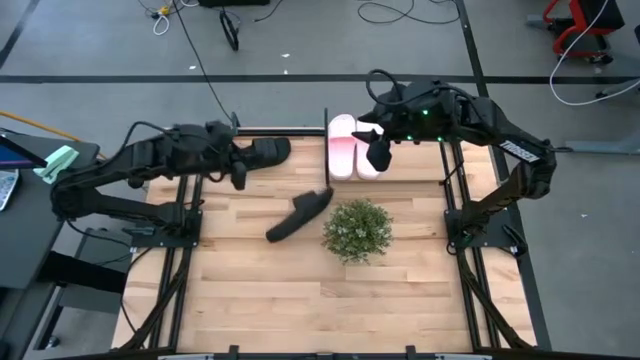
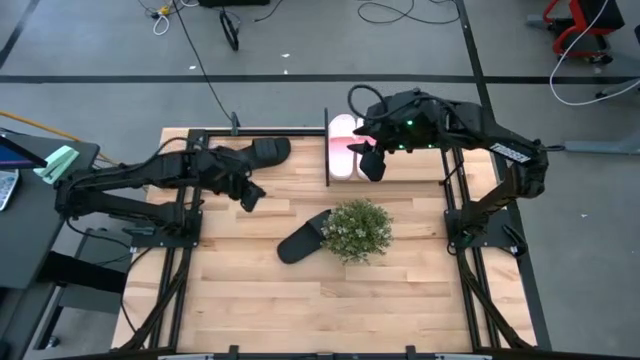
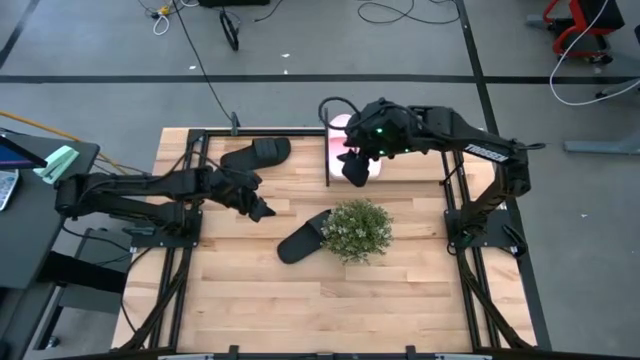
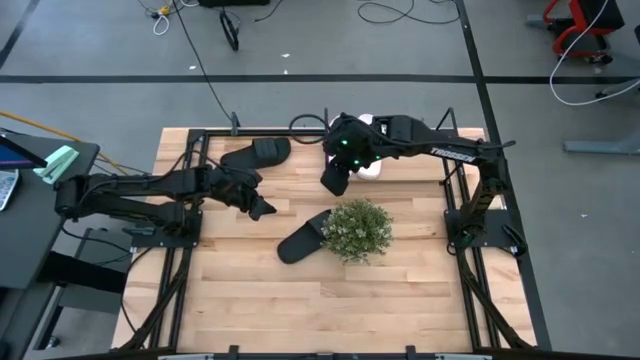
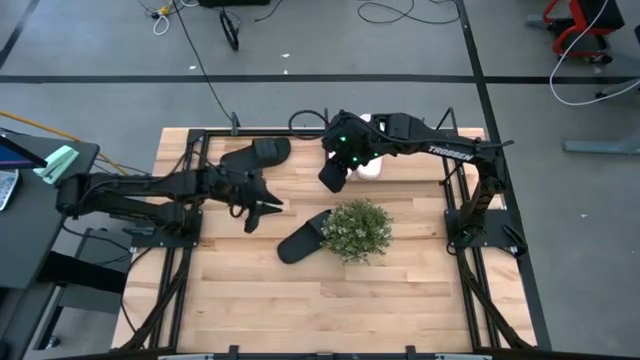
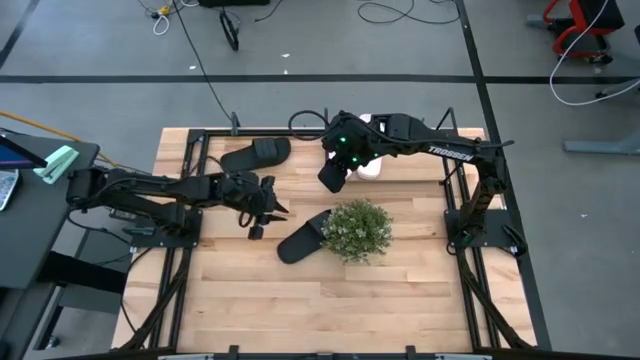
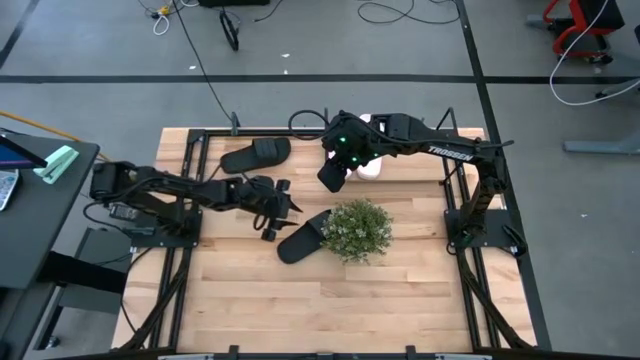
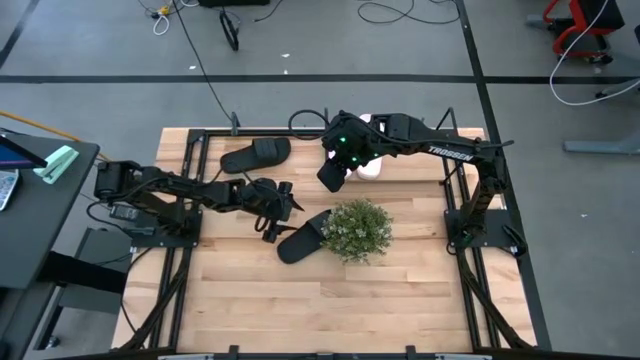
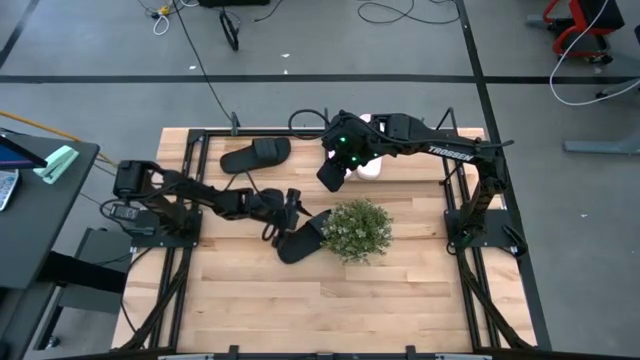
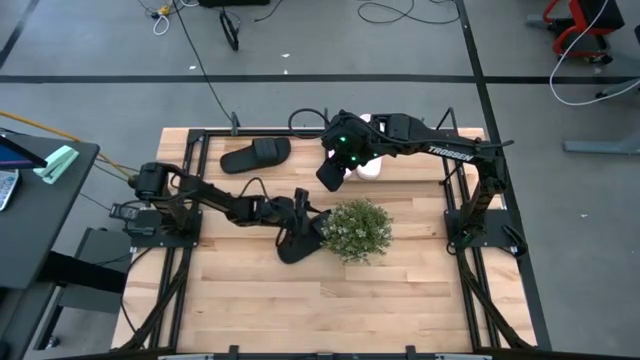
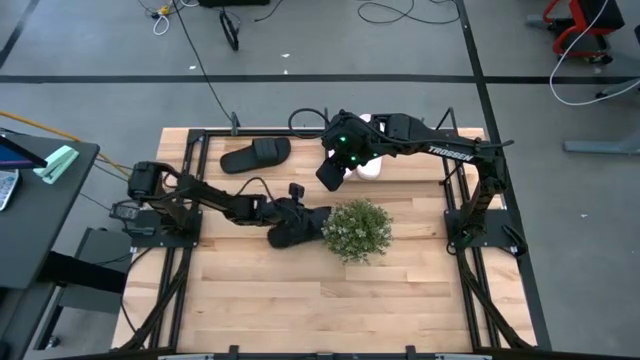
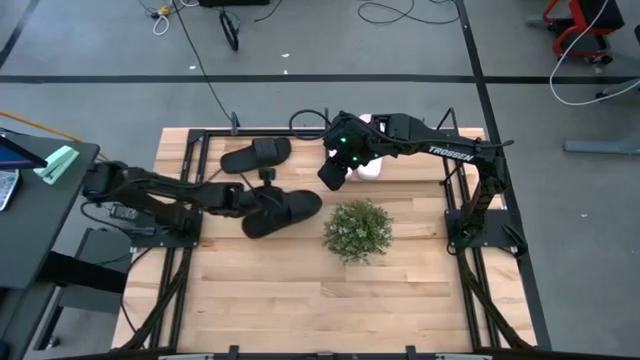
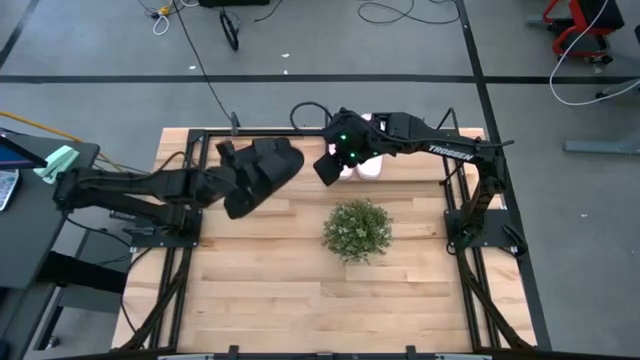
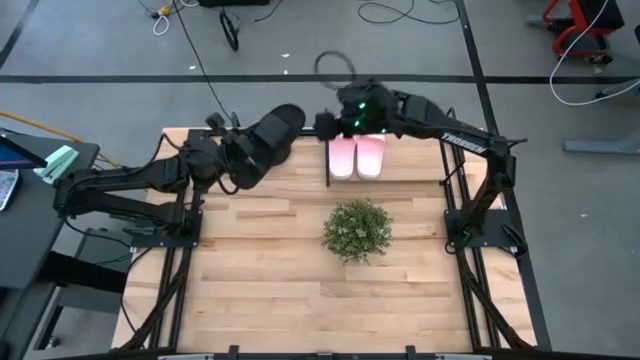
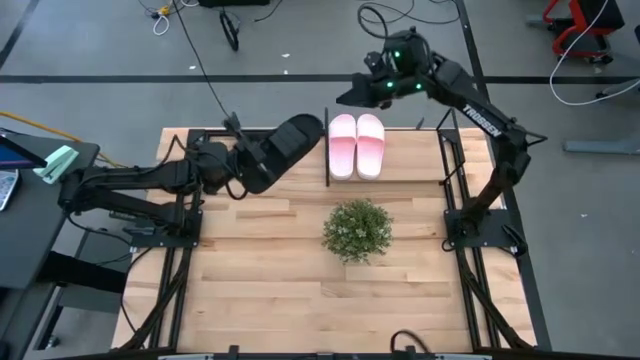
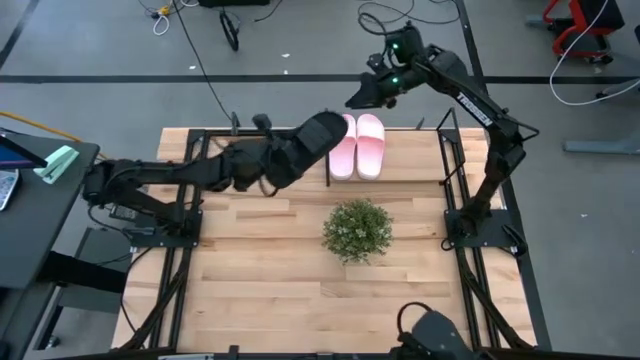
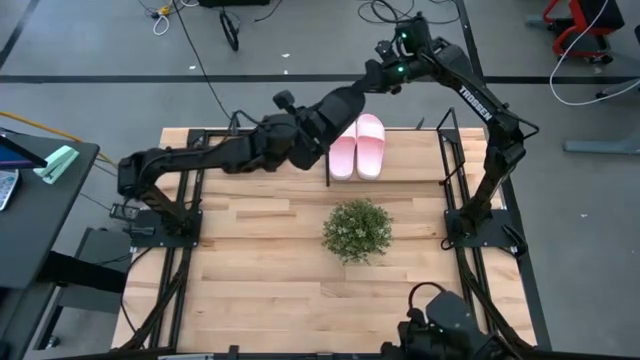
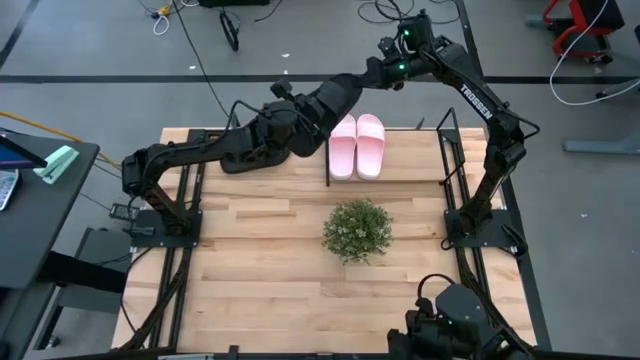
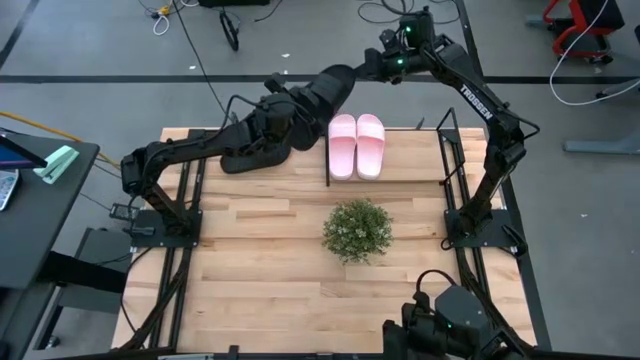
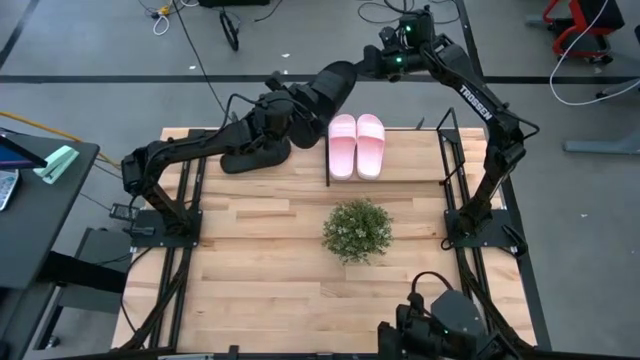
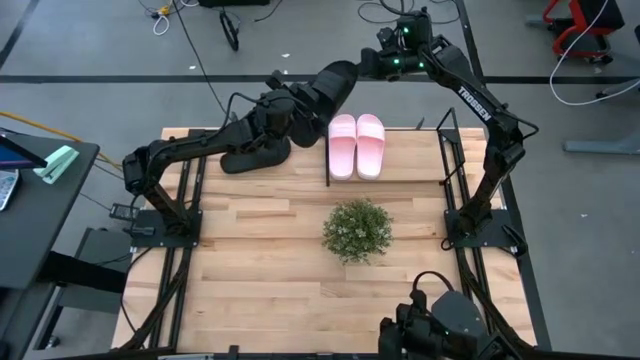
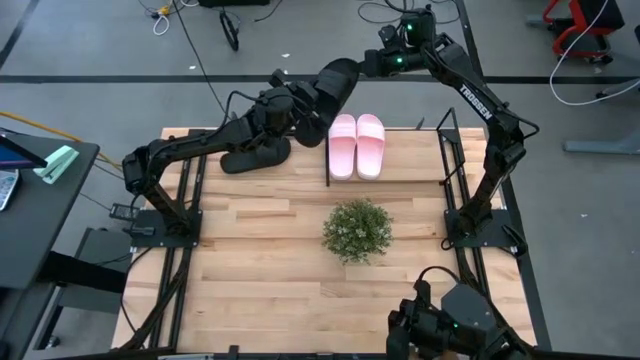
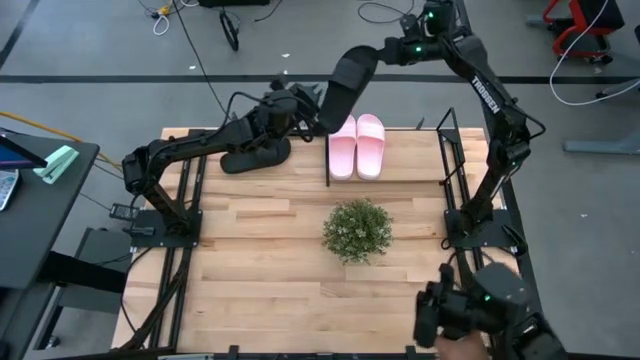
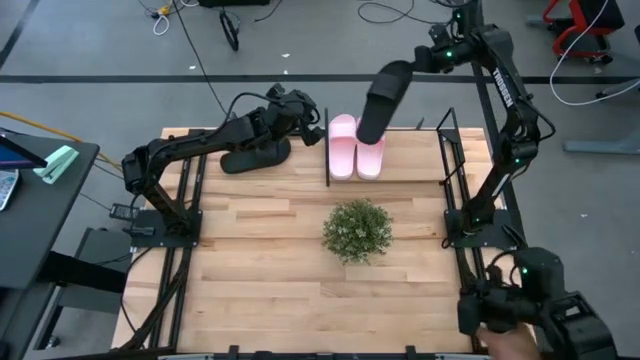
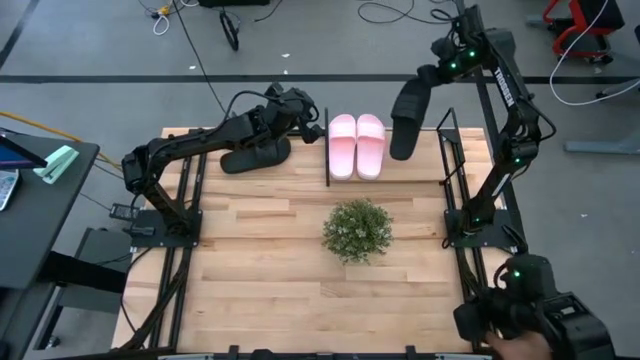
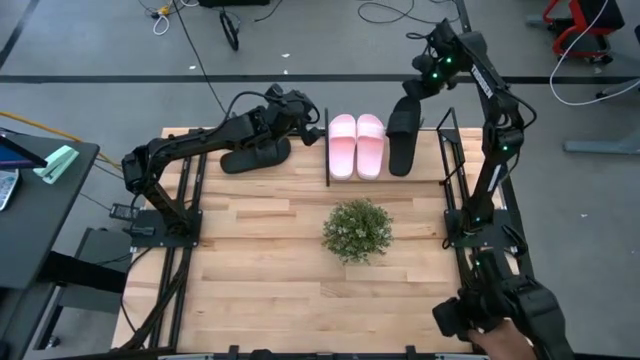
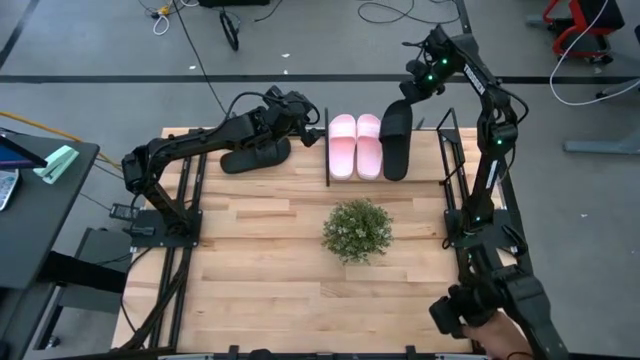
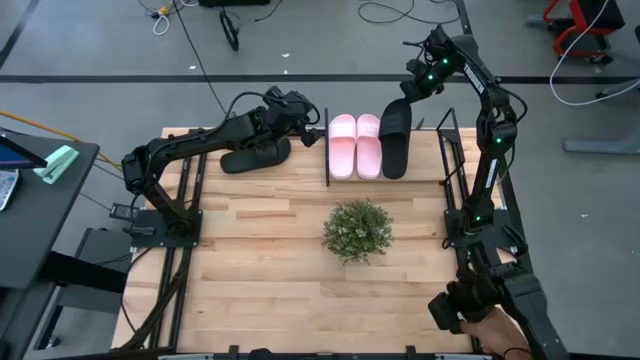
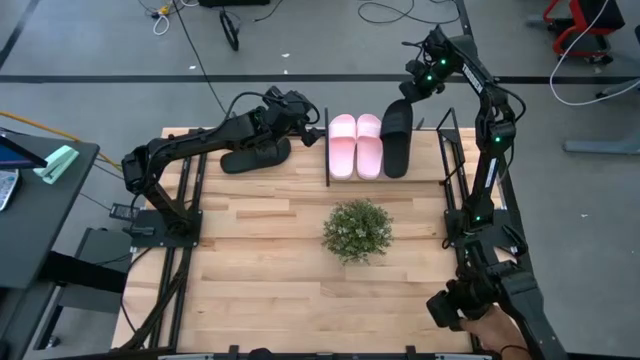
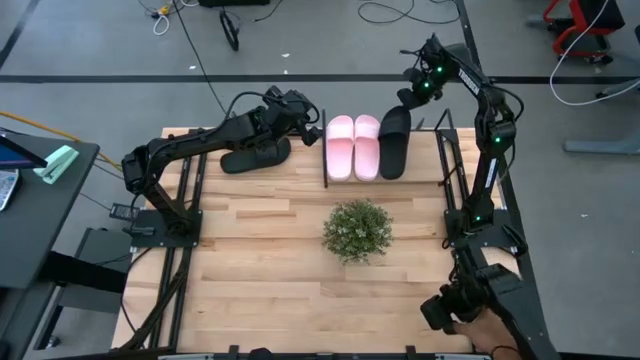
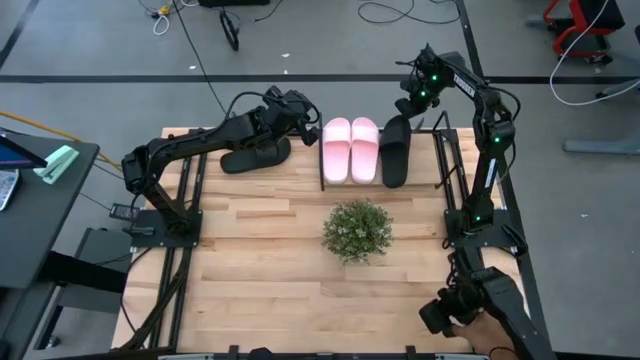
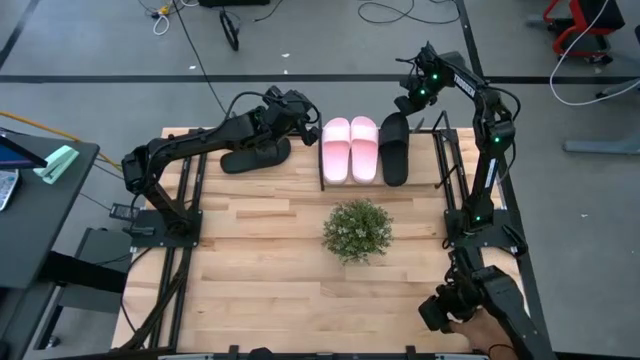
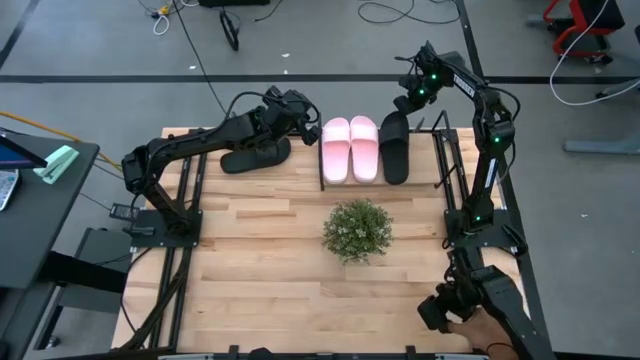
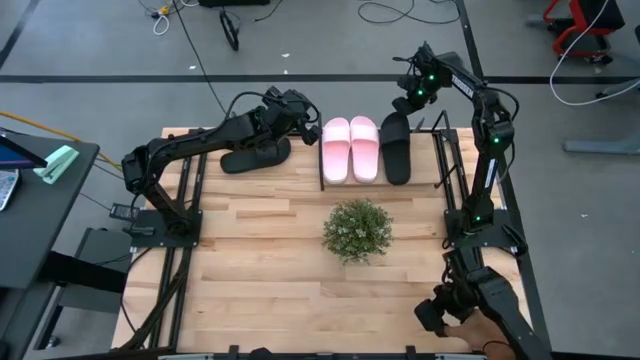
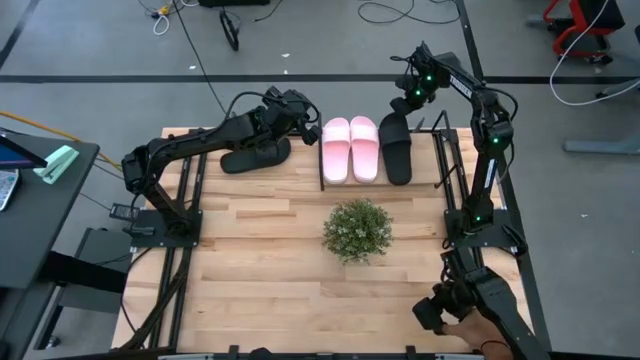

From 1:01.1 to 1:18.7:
Task: Pick and place slides into the shelf
Put the bottom black slide on the shelf
